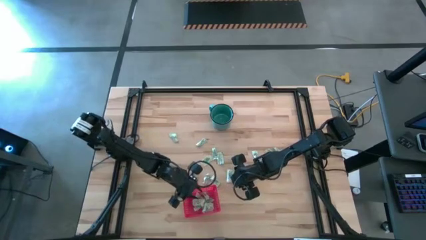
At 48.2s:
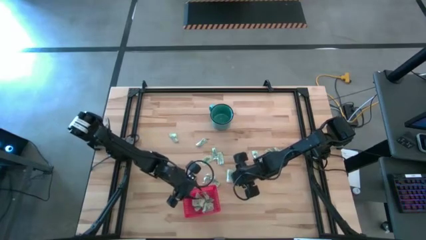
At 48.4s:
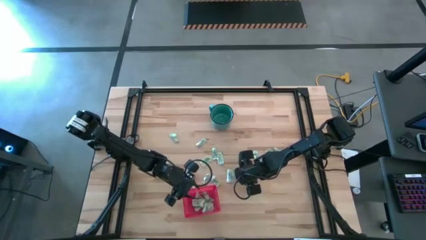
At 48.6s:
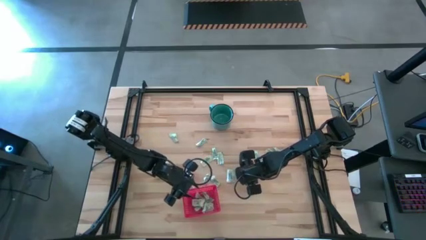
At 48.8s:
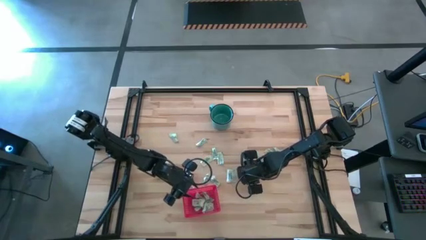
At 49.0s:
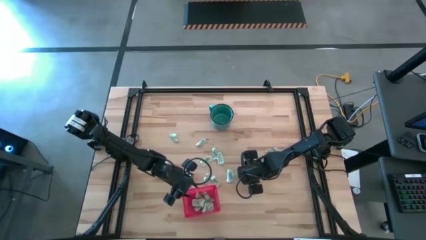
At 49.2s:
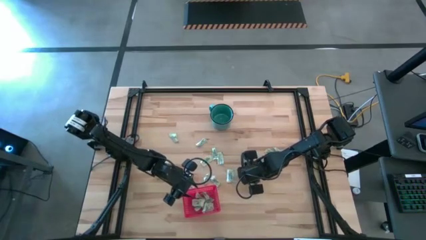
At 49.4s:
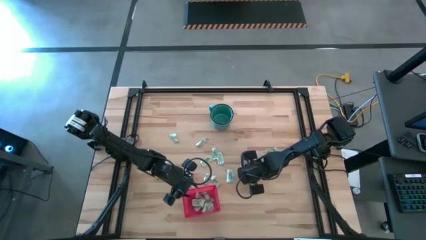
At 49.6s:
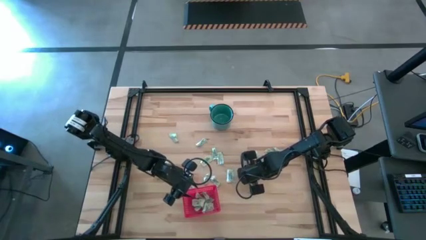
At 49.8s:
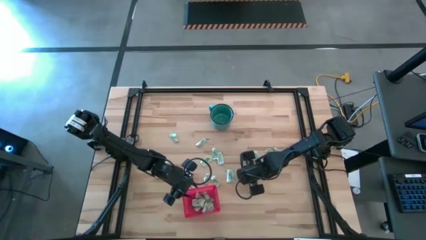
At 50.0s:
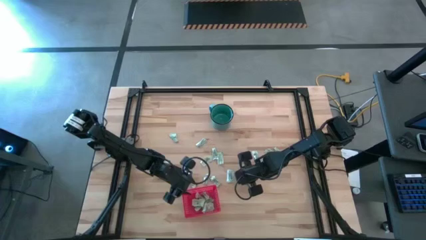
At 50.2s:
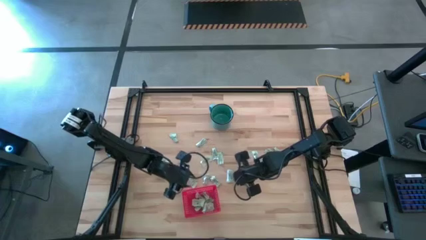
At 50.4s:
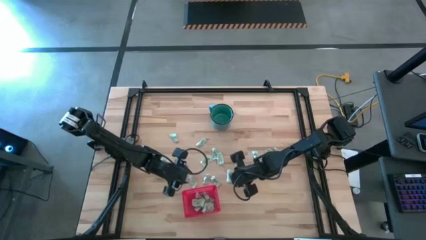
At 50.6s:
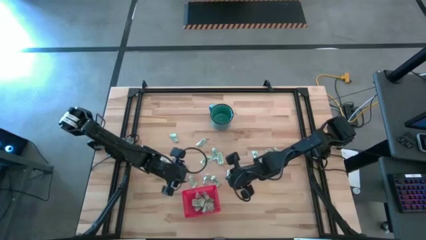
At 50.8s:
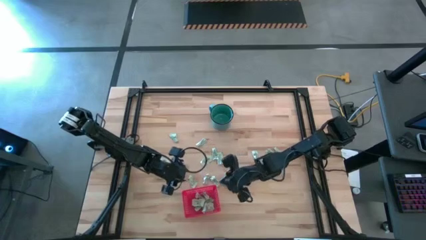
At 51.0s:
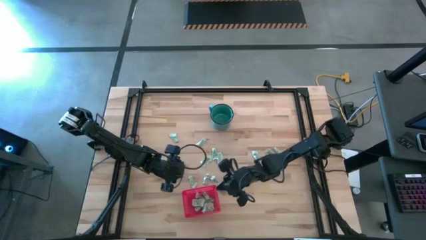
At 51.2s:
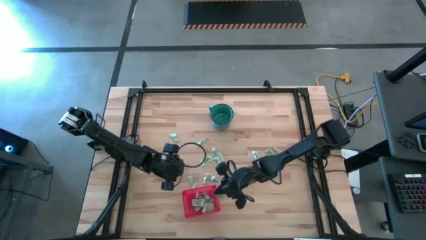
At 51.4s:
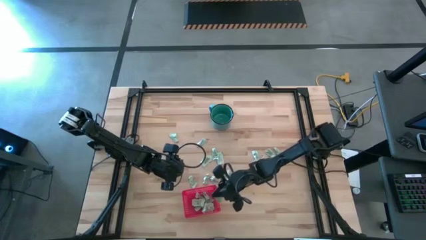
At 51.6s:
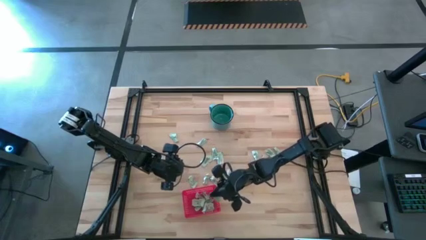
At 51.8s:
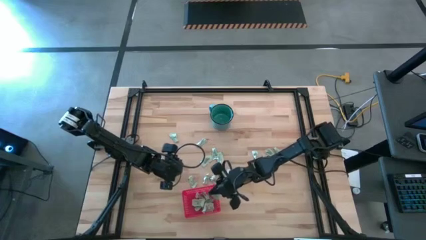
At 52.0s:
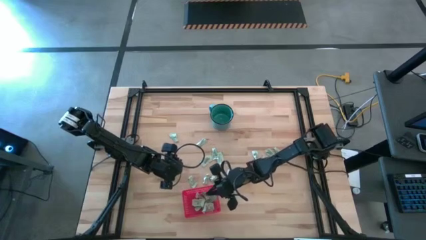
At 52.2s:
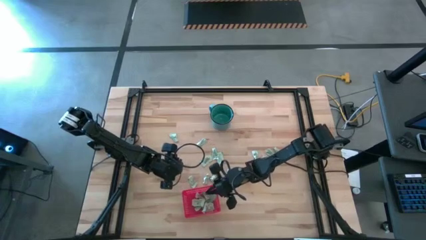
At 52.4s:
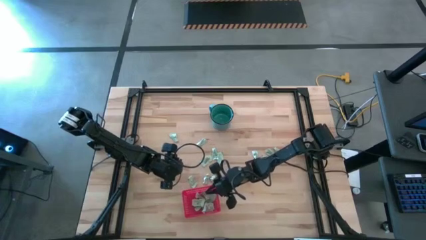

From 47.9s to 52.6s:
Task: Pick and place items into bin
Put the green stevia packet into the red bin

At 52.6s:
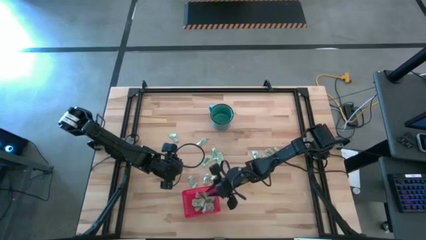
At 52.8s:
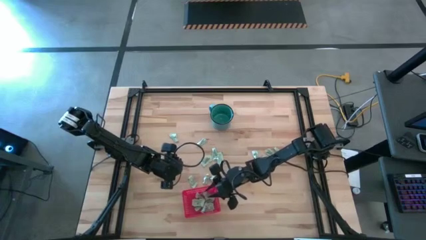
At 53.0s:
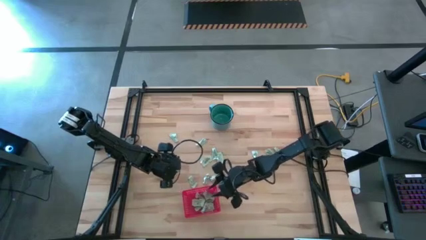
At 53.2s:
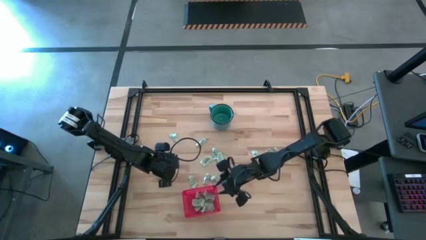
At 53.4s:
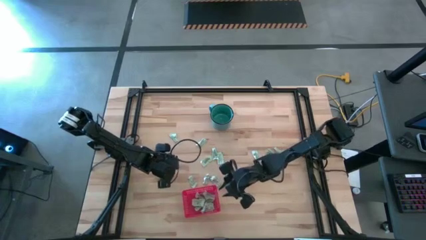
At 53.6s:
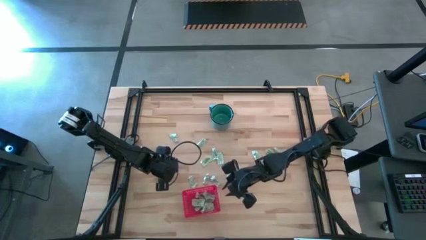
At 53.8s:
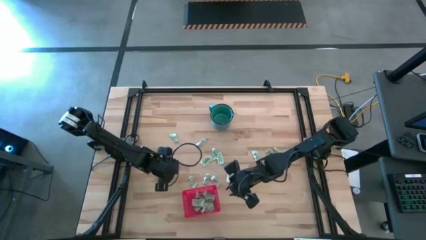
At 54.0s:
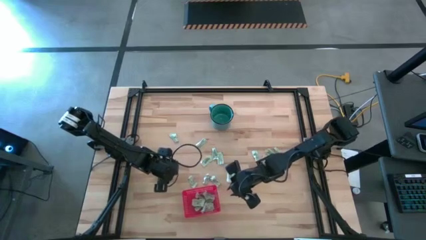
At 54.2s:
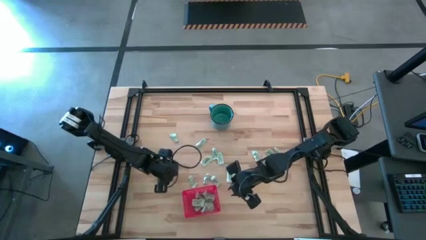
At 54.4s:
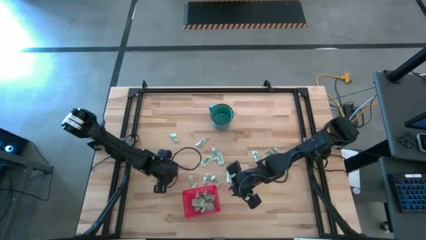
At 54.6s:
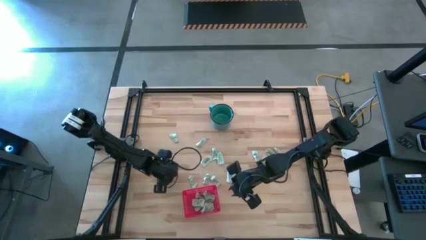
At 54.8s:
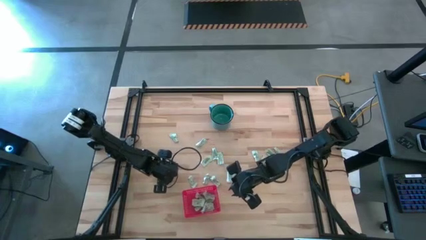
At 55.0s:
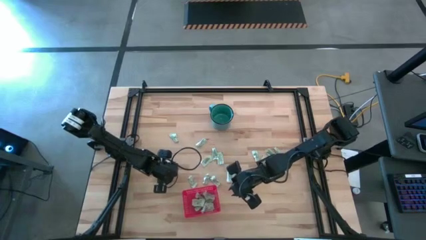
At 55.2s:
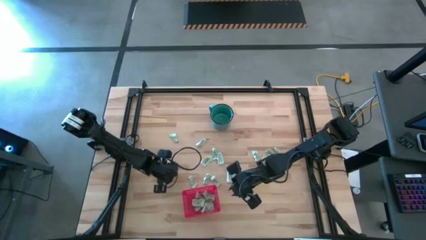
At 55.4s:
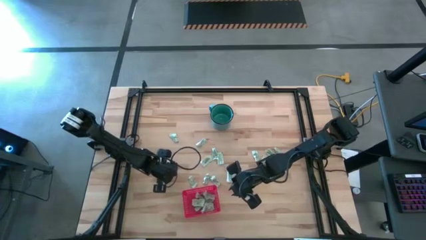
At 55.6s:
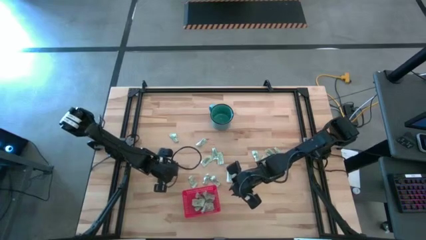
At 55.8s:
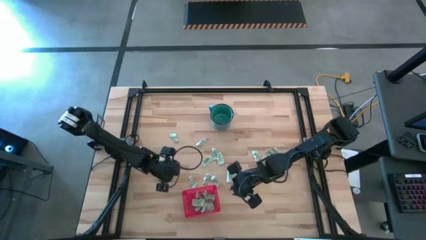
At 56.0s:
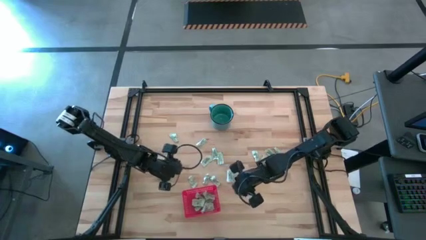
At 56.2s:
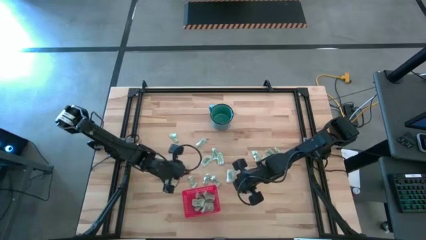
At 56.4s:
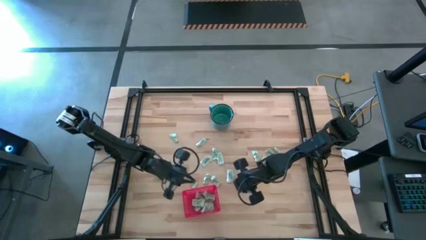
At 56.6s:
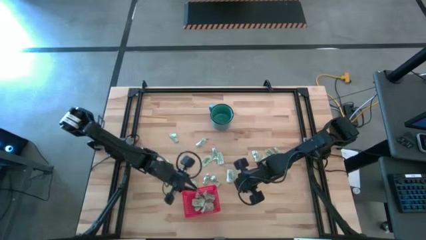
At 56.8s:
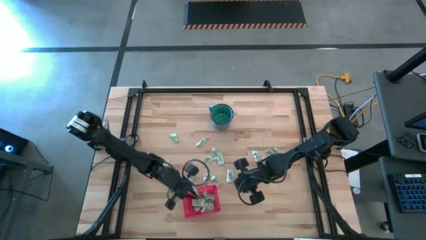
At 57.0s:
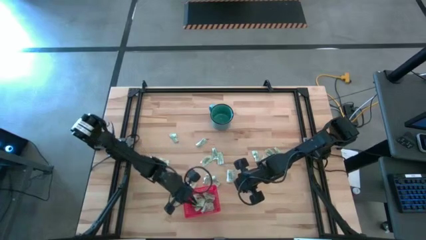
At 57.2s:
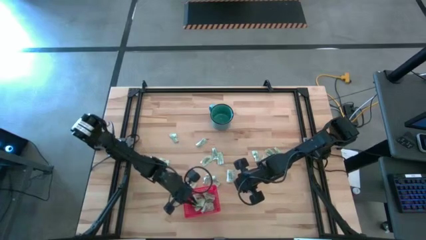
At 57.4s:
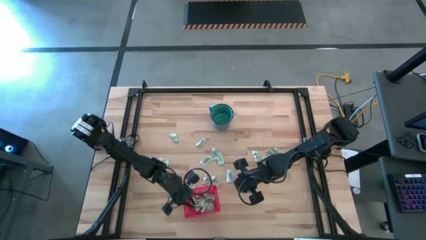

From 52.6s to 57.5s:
Put the green stevia packet into the red bin

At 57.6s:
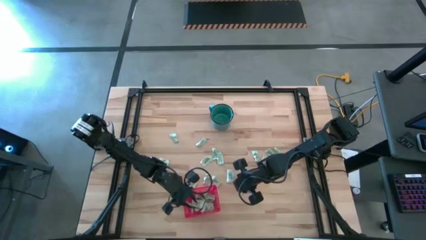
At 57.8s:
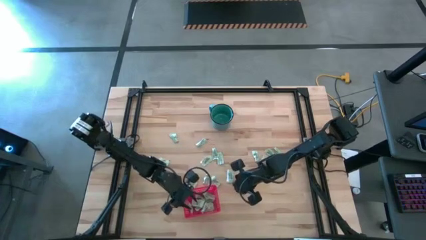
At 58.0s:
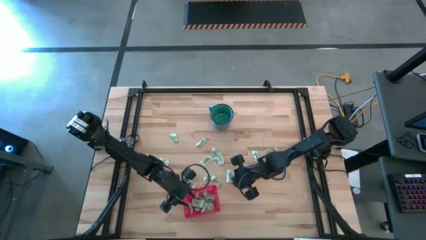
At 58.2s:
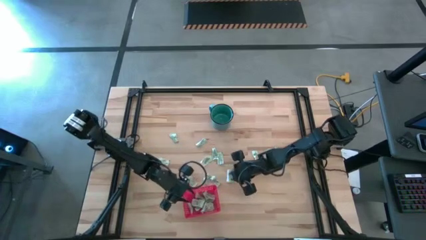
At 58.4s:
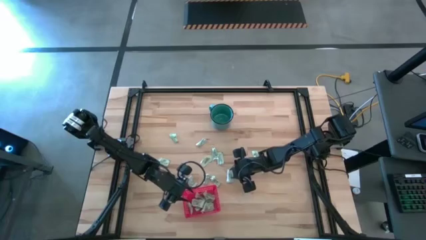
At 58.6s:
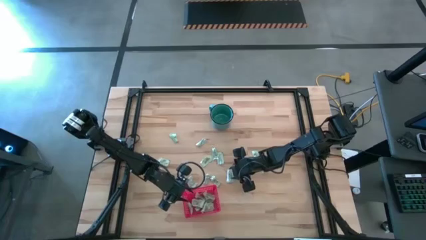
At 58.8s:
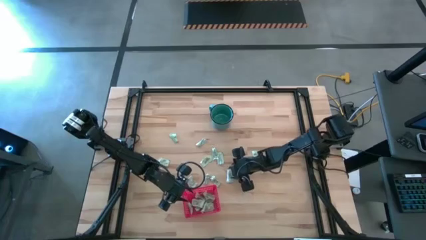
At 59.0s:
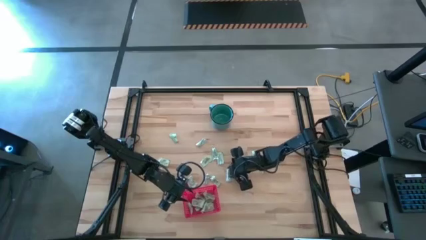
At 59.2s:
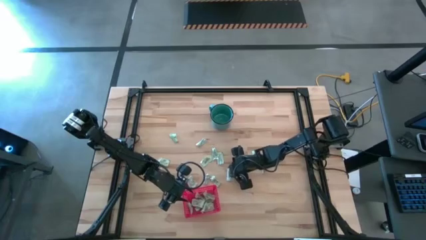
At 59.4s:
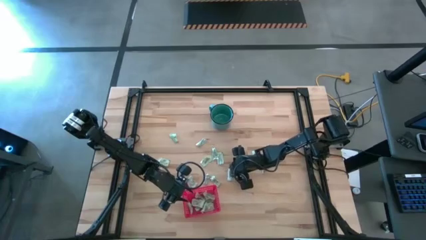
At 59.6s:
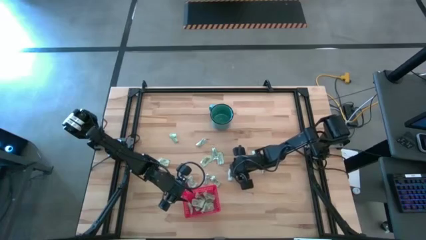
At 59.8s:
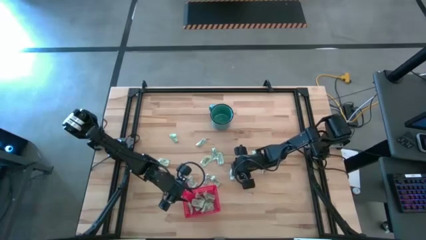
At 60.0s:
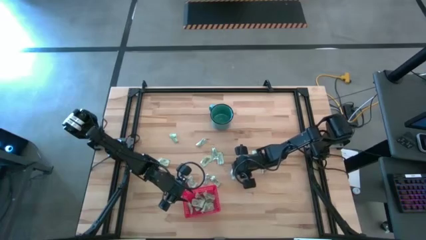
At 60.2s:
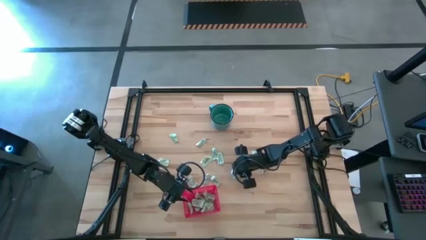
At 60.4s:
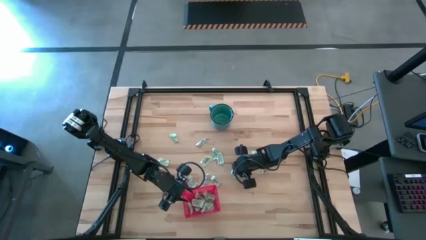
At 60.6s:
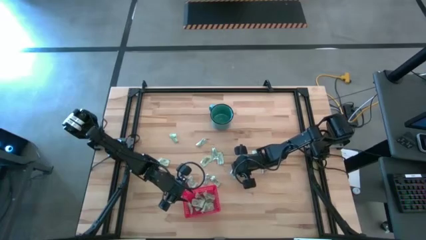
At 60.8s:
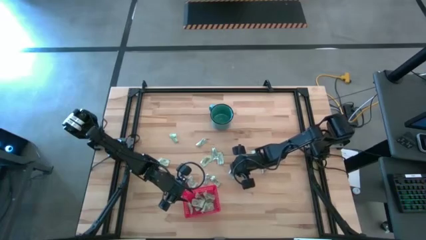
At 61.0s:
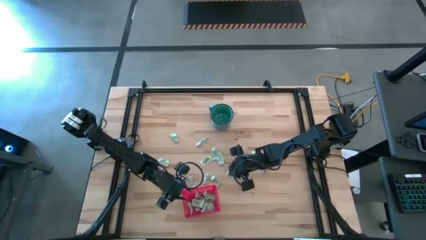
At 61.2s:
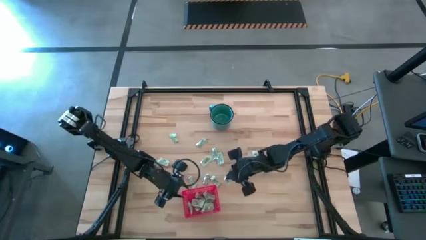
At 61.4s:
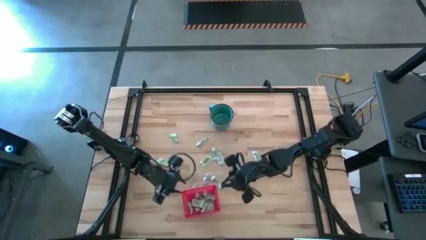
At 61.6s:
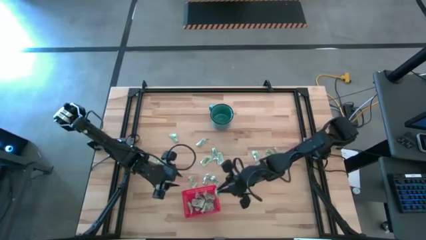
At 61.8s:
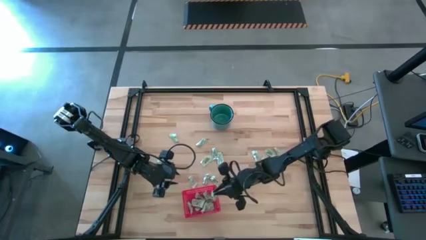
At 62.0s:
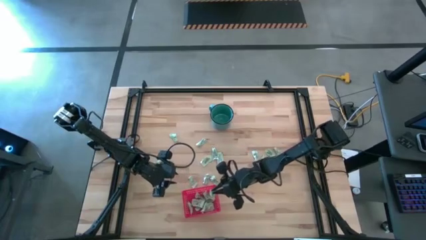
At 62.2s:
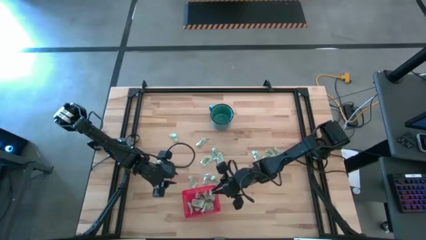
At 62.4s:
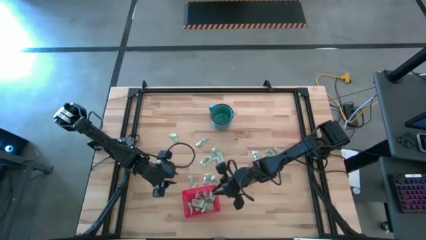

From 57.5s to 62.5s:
Put the green stevia packet into the red bin

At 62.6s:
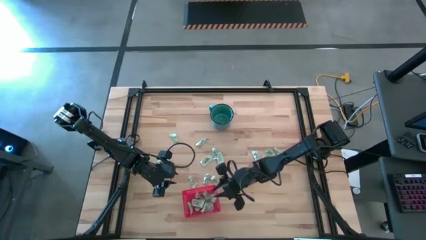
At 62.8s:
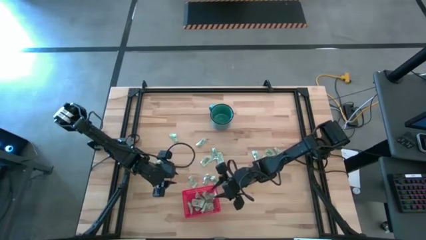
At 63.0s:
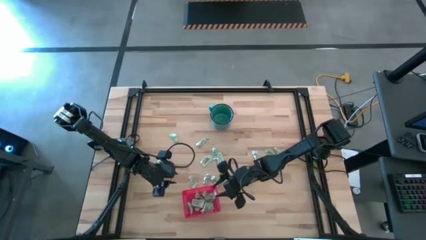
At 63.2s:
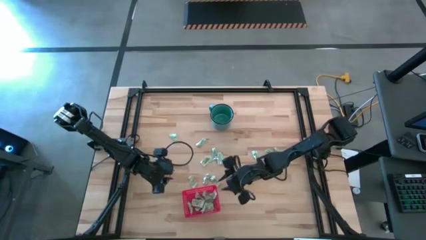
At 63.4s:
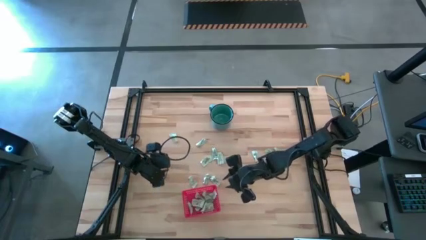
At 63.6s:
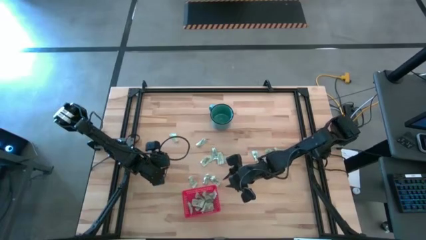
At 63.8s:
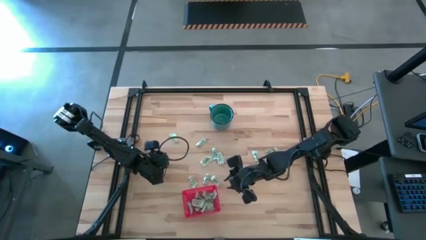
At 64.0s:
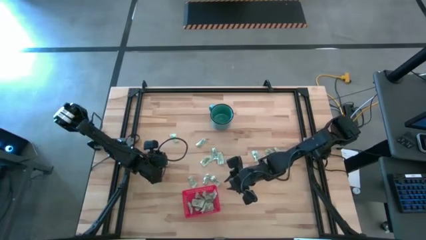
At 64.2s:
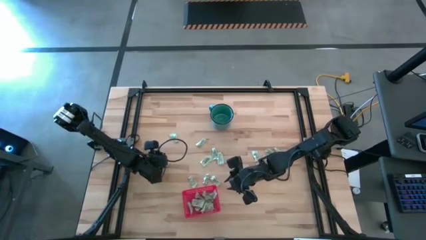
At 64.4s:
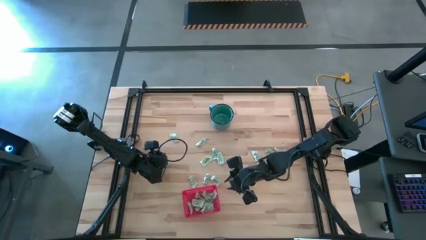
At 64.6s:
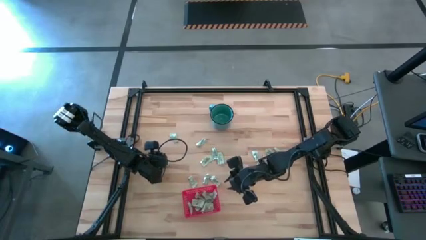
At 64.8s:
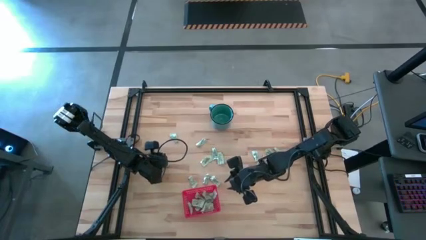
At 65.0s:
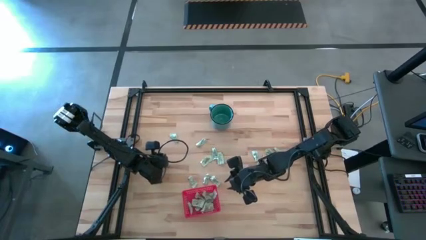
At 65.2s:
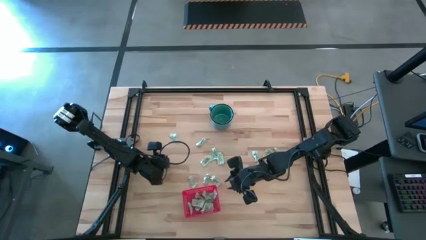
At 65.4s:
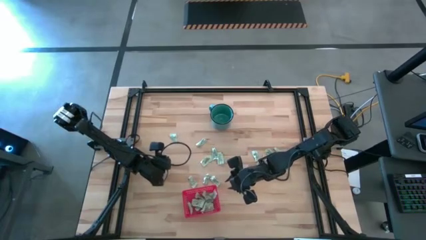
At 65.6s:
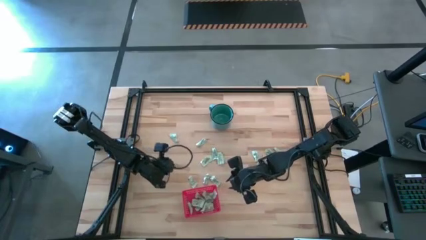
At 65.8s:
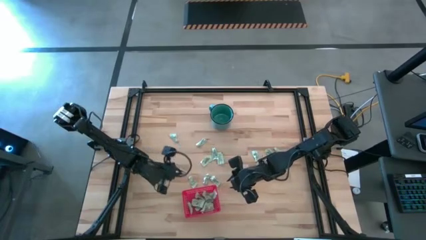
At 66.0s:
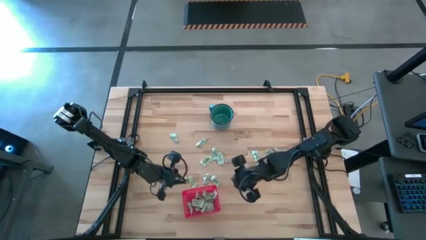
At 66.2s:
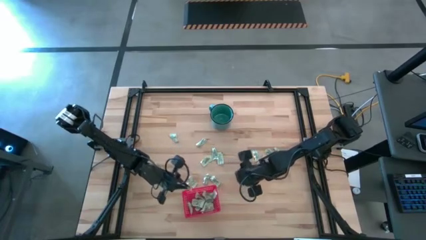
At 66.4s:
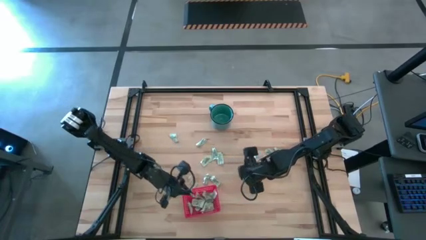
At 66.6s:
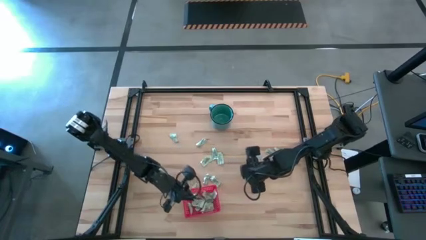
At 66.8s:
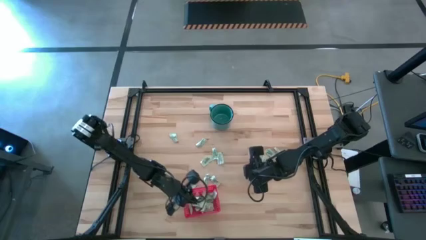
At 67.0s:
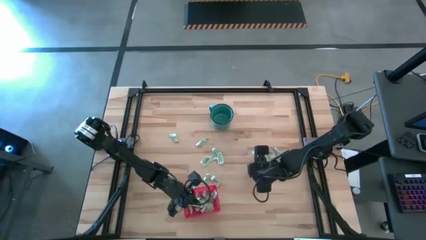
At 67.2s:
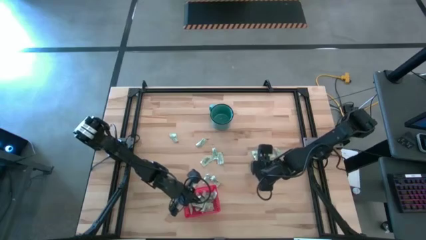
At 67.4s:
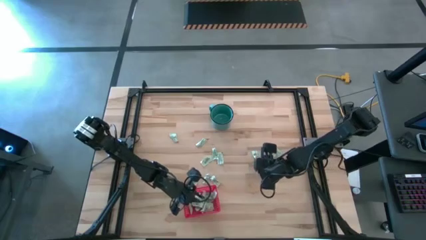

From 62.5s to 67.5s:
Put the green stevia packet into the red bin
